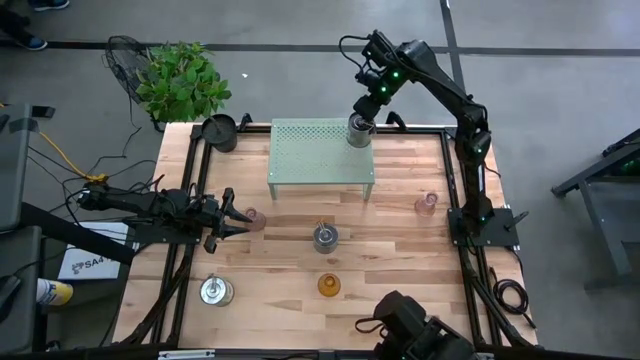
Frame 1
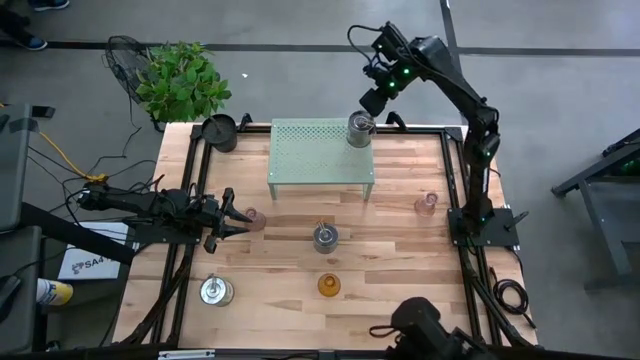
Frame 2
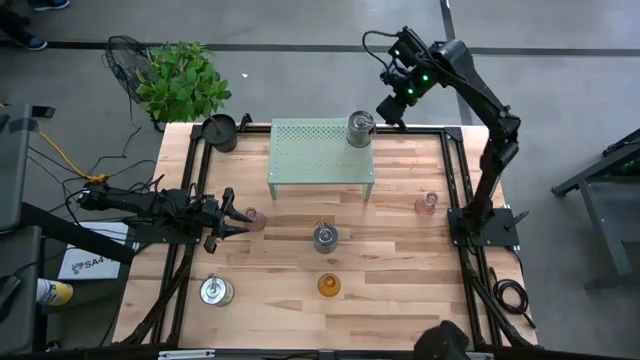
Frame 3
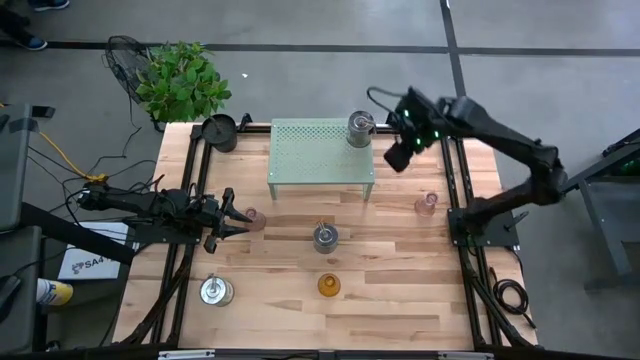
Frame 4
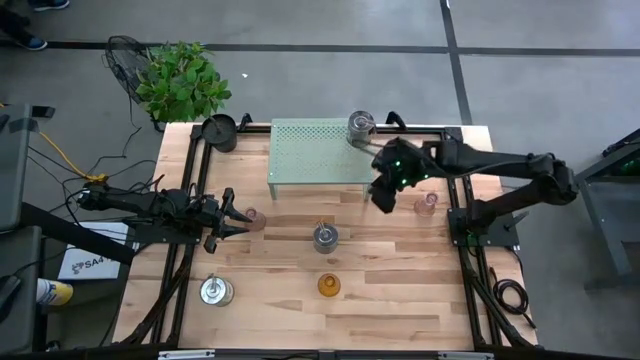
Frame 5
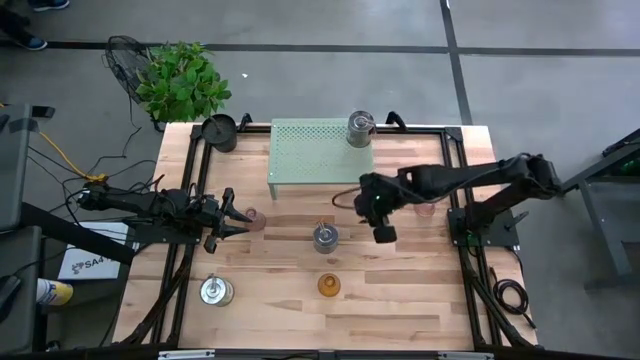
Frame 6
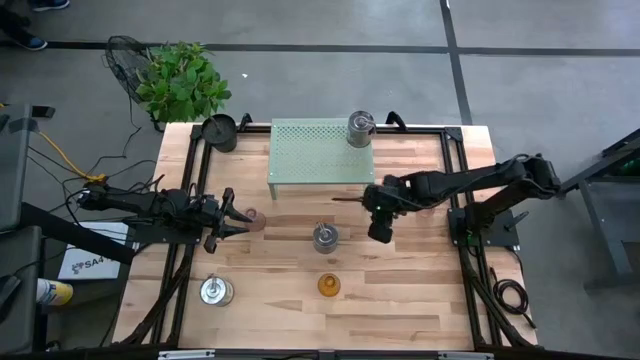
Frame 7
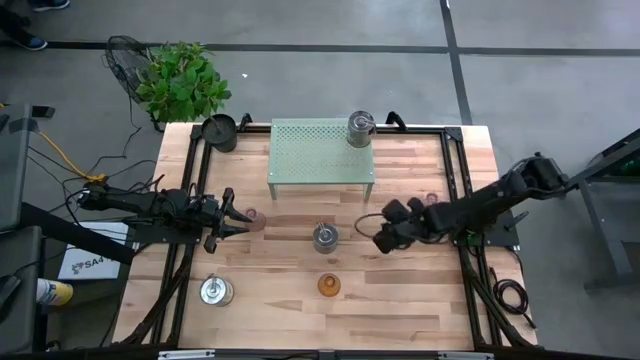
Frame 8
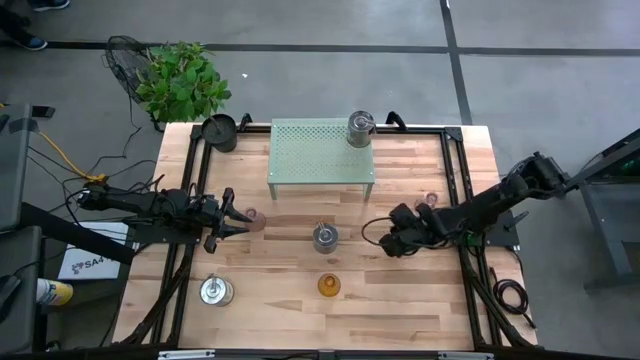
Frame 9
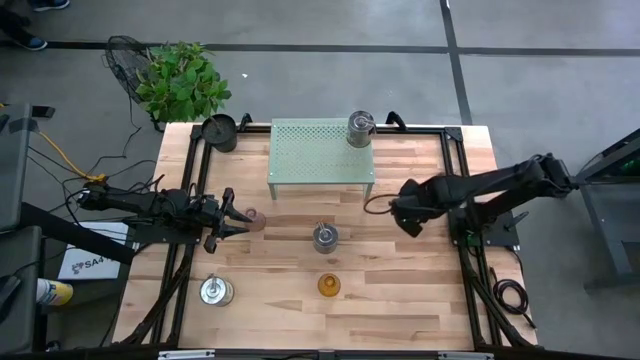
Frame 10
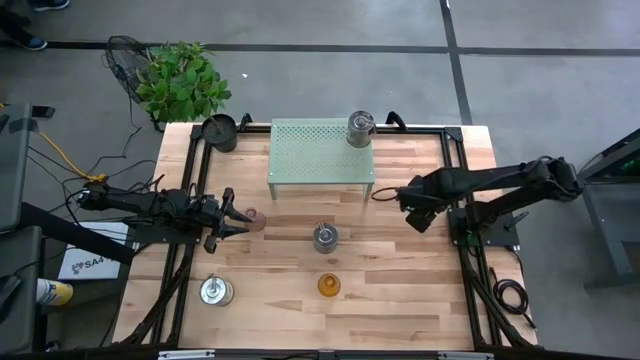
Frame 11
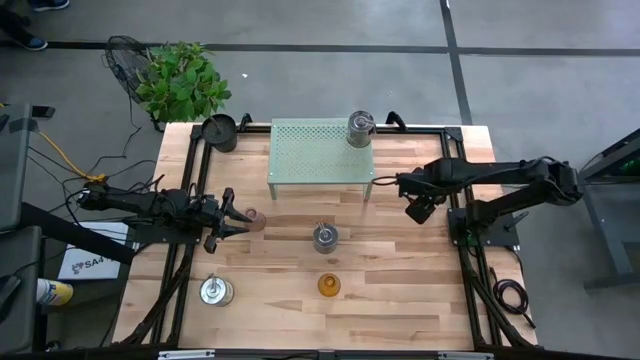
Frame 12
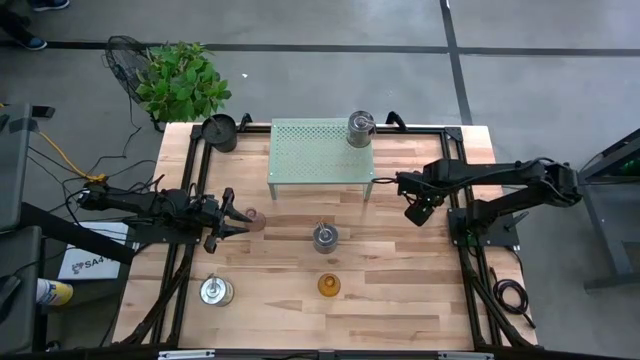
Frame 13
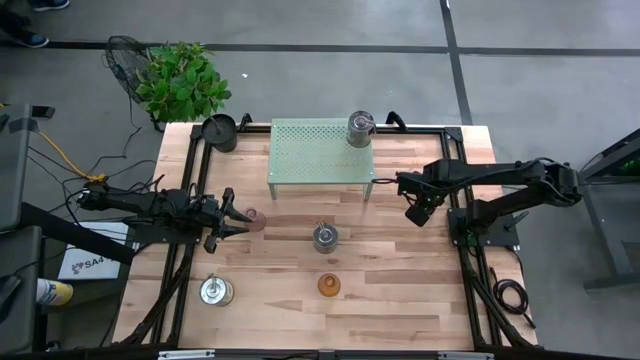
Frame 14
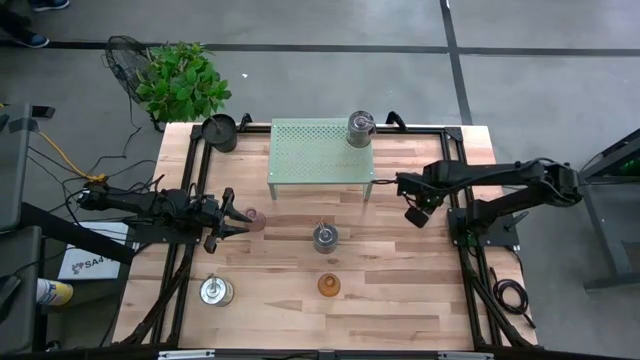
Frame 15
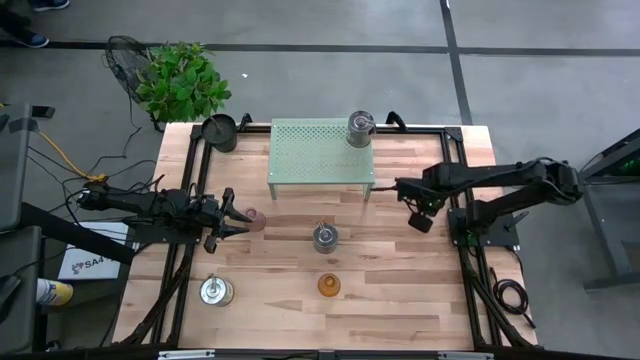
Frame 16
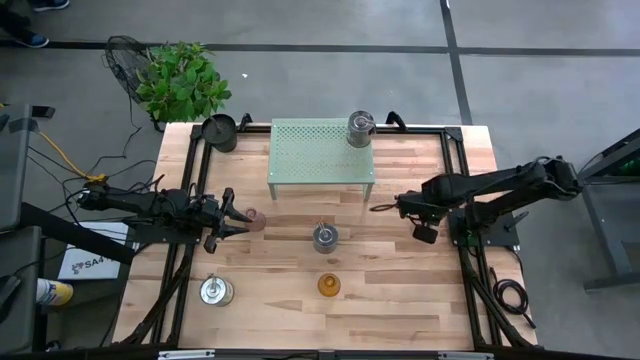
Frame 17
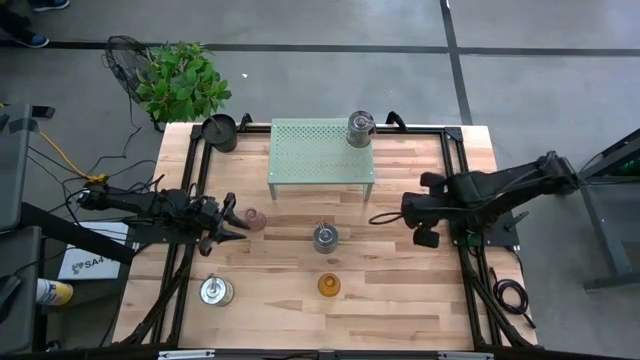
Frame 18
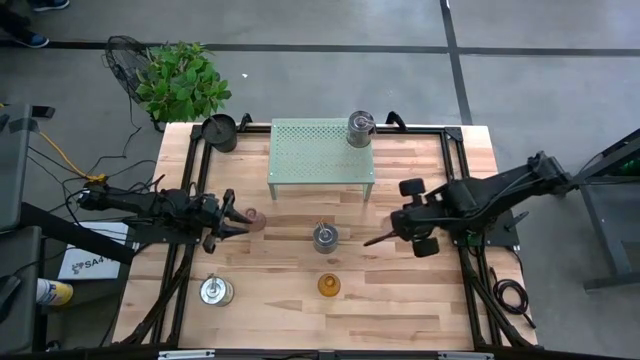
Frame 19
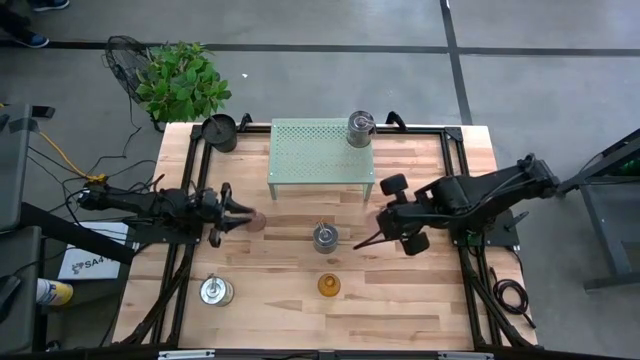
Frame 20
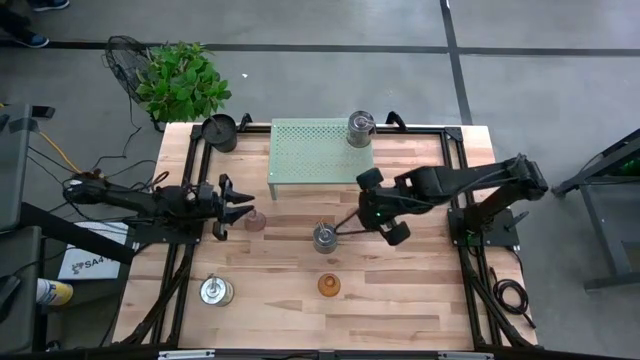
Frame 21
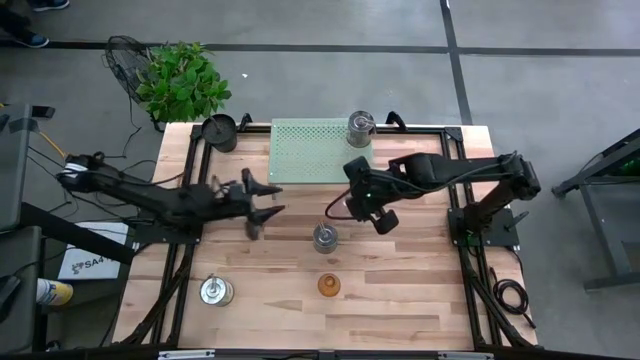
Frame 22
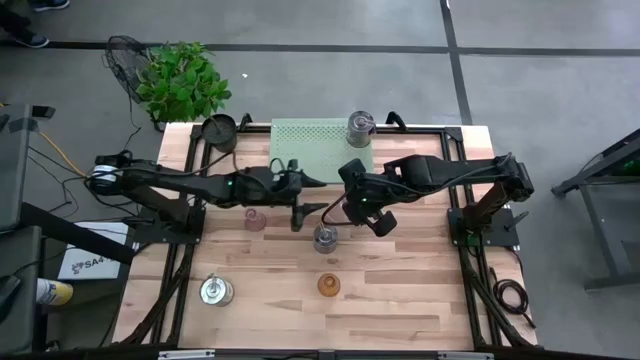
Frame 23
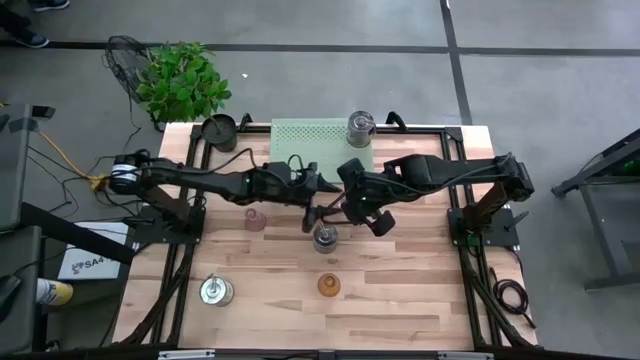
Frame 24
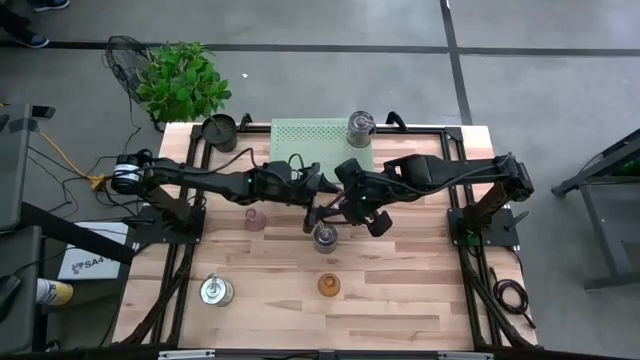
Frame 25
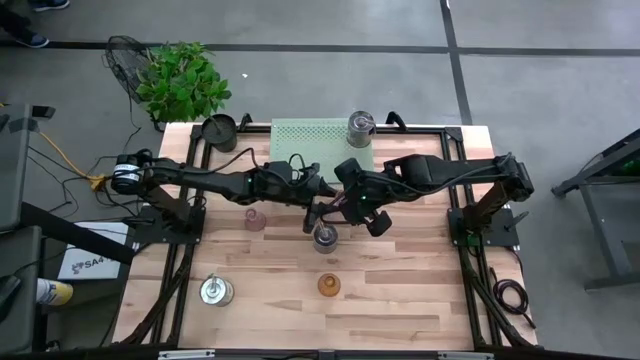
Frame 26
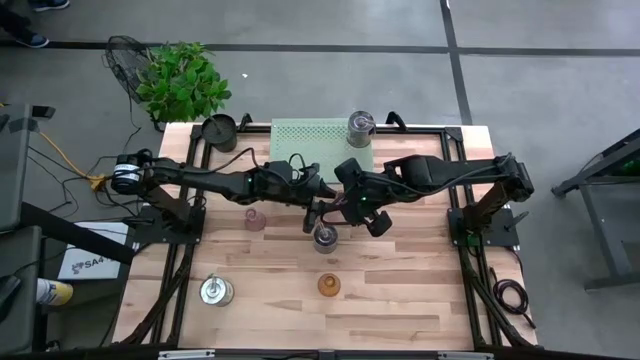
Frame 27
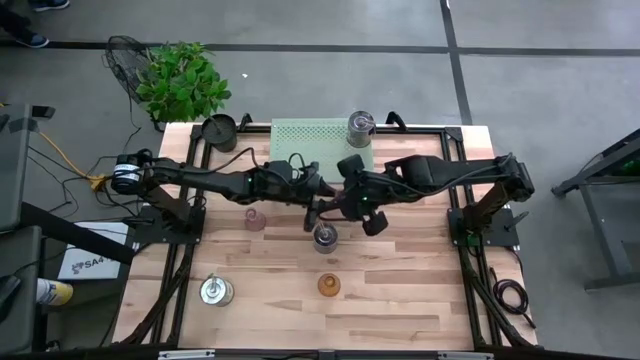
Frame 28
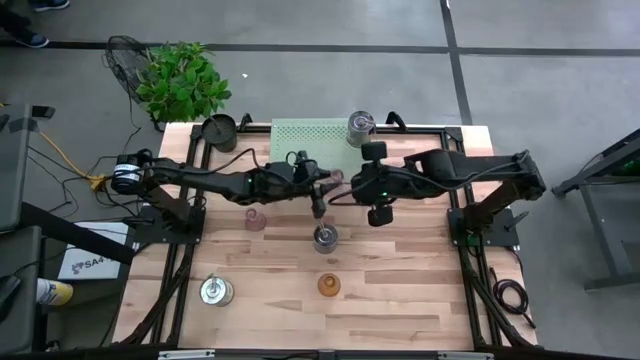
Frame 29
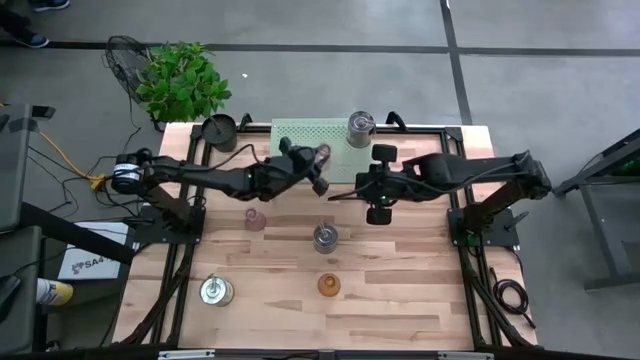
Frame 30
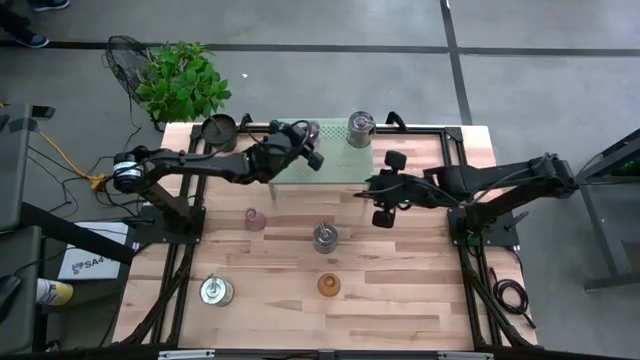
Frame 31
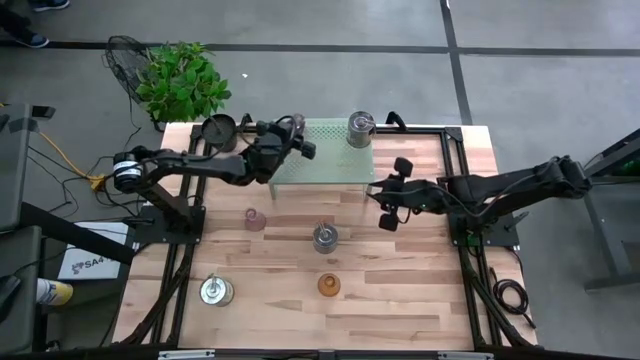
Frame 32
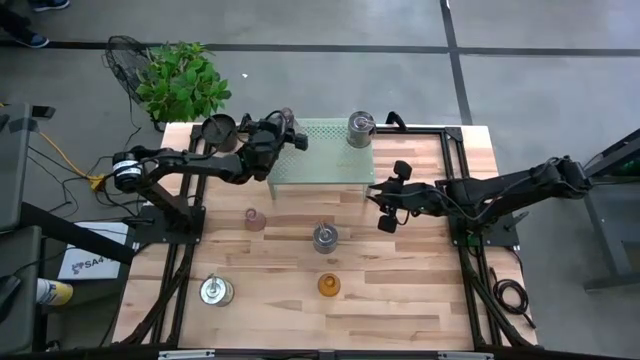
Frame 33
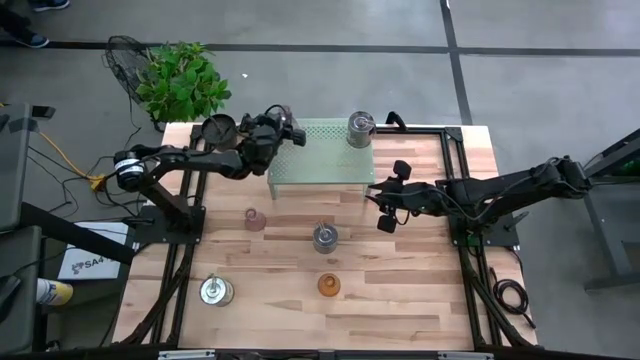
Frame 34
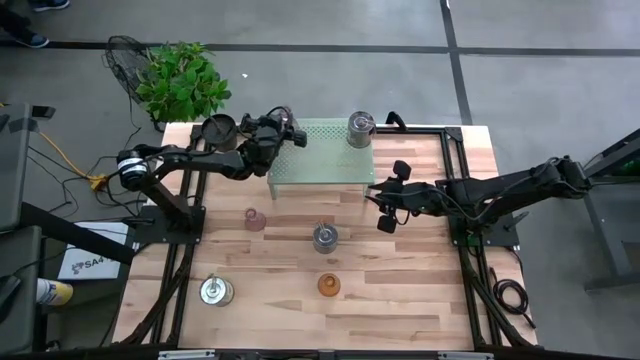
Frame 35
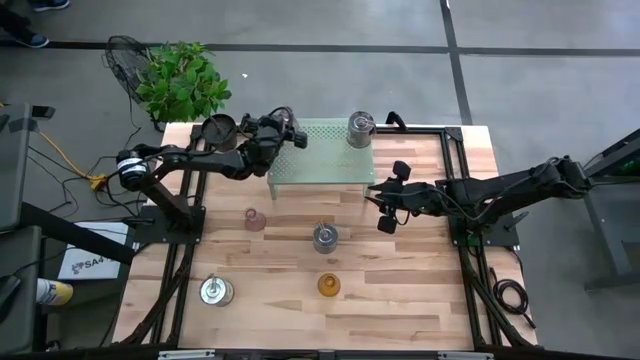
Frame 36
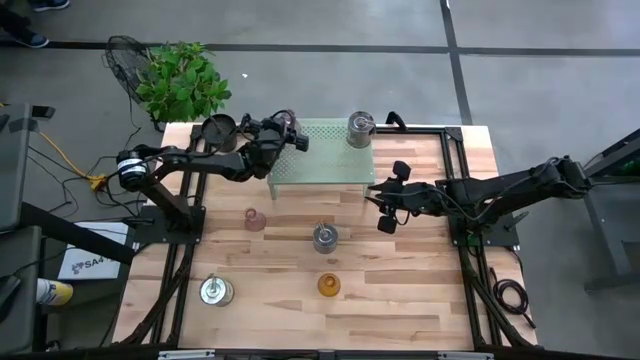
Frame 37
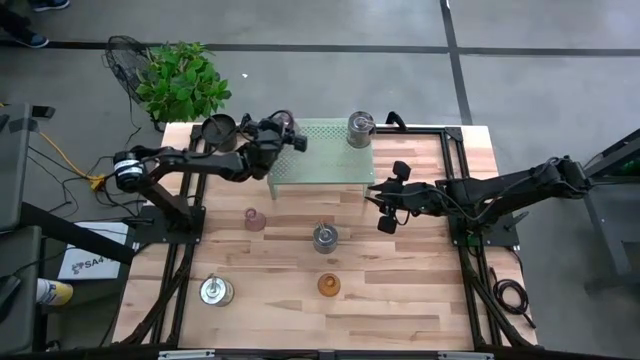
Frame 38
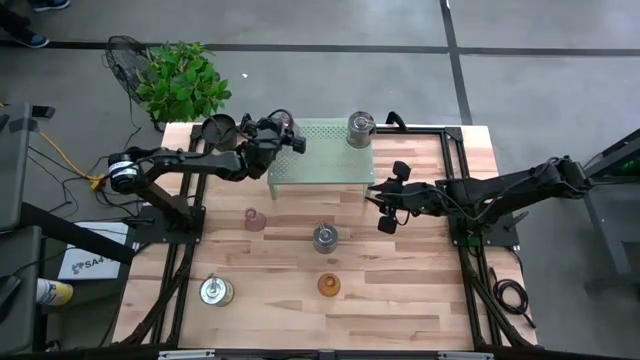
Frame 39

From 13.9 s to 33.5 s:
Task: Pick & Place candle stick holders
Put the right pink candle holder on the shelf

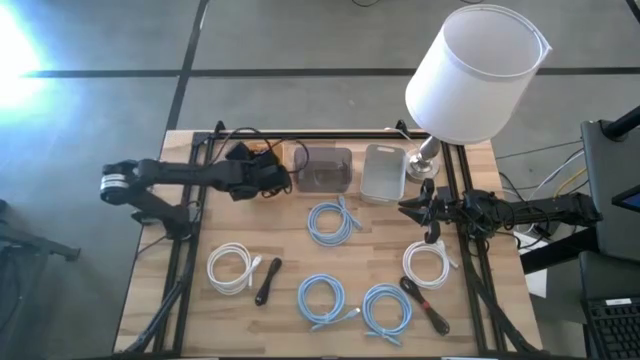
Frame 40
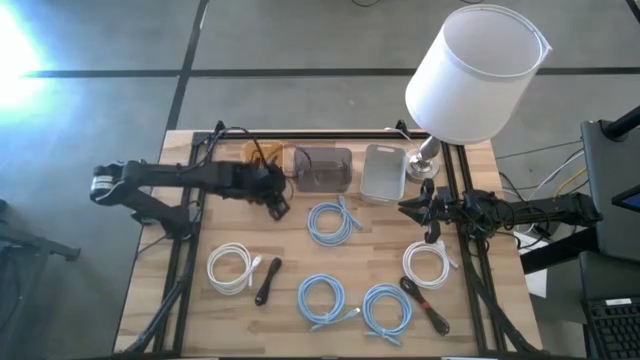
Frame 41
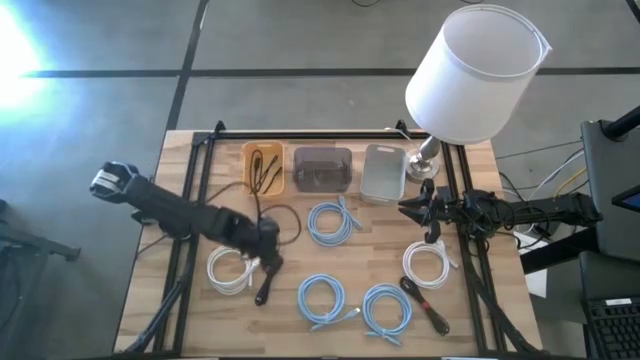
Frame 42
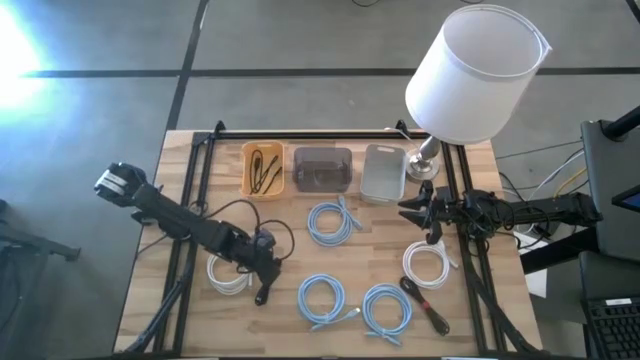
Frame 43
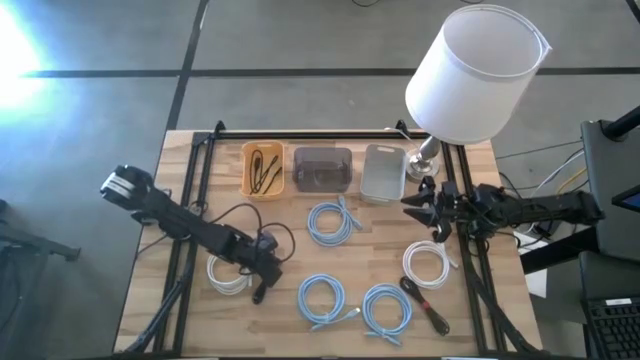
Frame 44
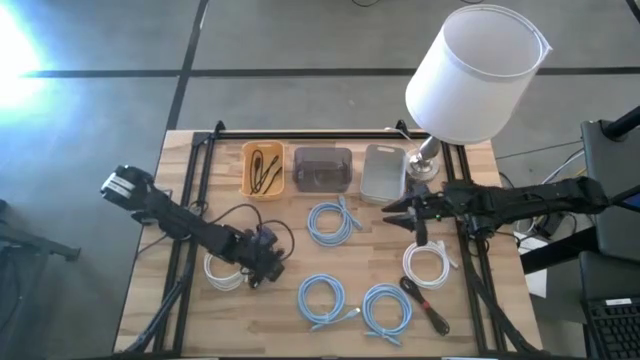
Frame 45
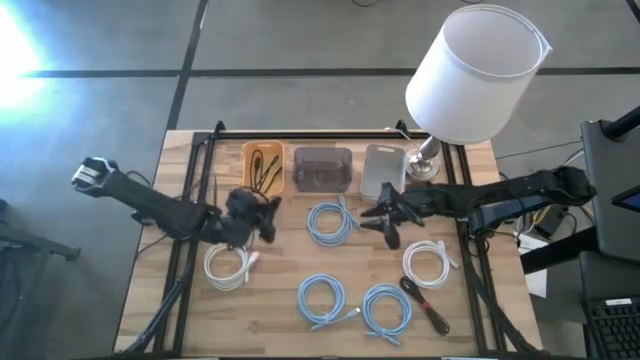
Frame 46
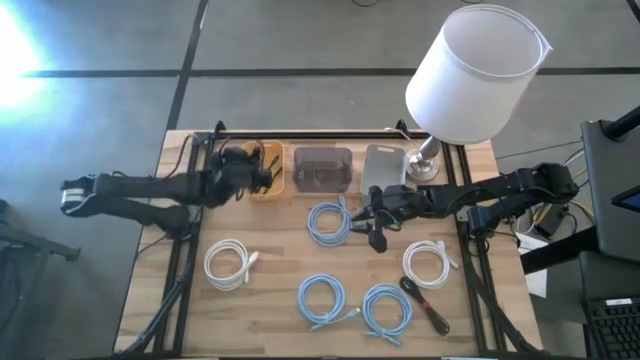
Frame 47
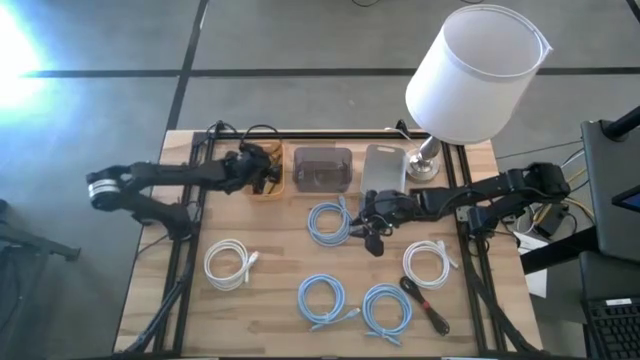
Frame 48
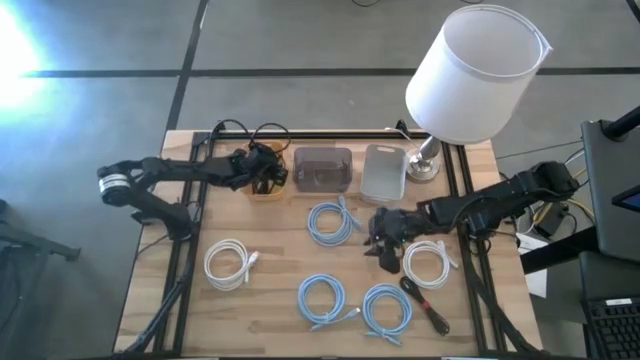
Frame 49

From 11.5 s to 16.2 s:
Task: Pick & Place USB Port
Put the left black charger cable into the orange bin
